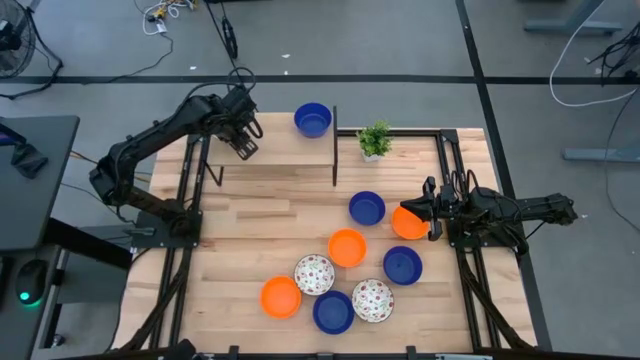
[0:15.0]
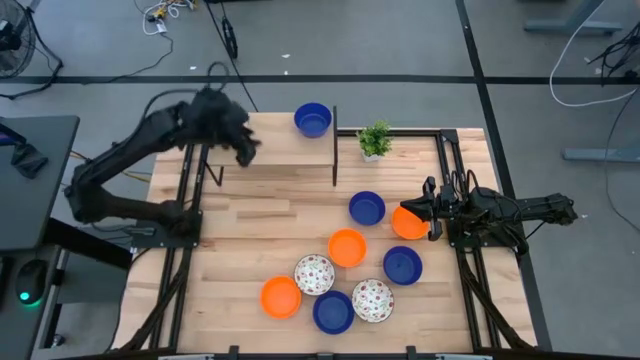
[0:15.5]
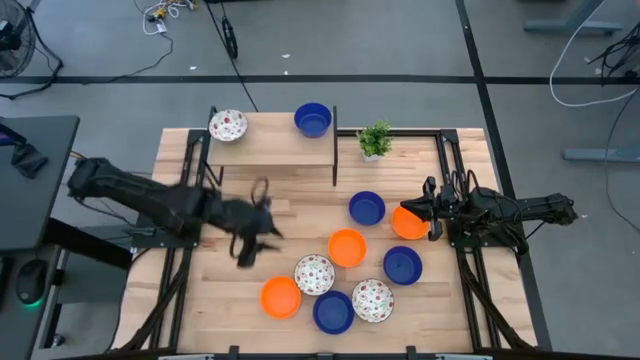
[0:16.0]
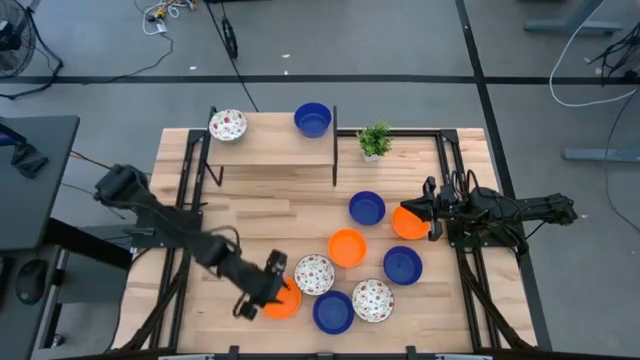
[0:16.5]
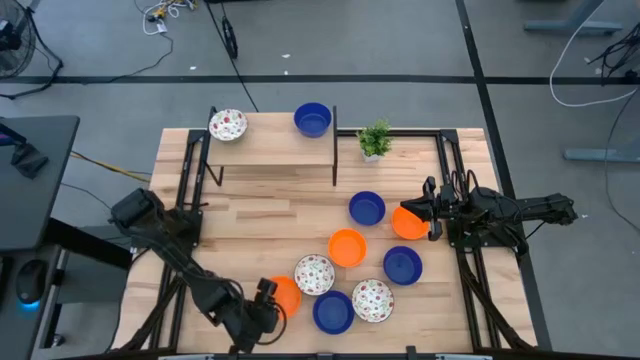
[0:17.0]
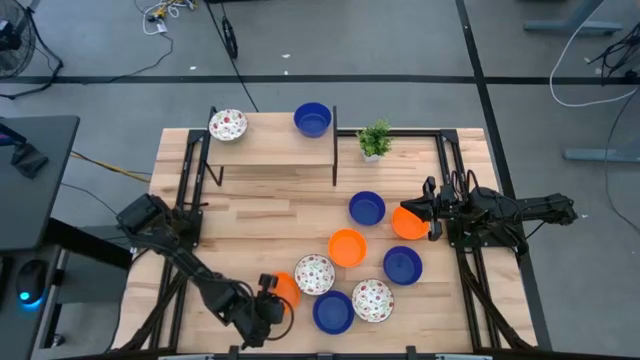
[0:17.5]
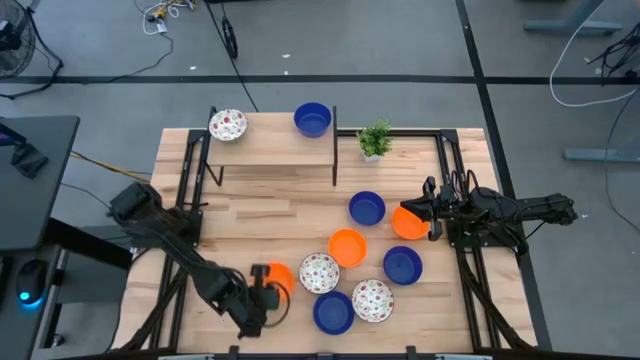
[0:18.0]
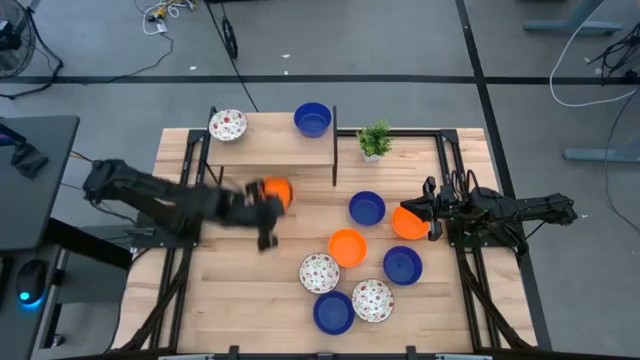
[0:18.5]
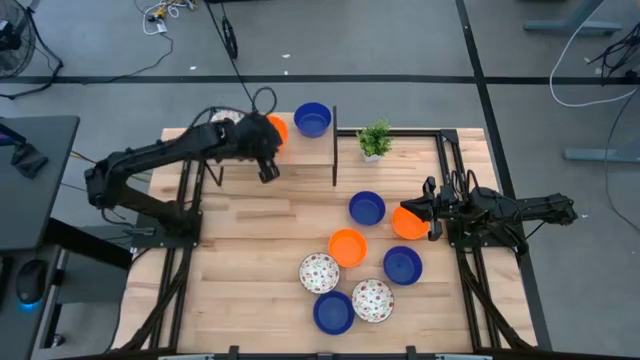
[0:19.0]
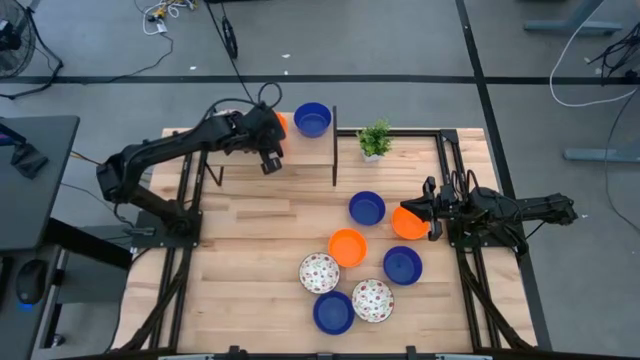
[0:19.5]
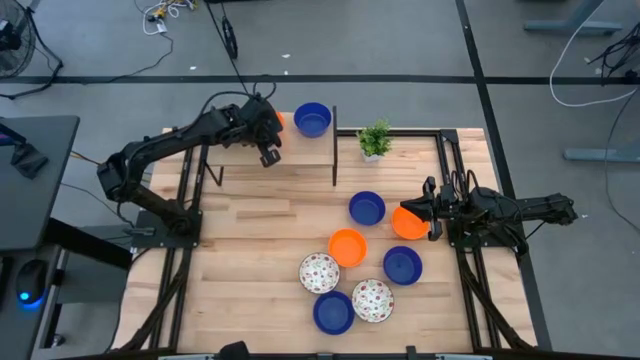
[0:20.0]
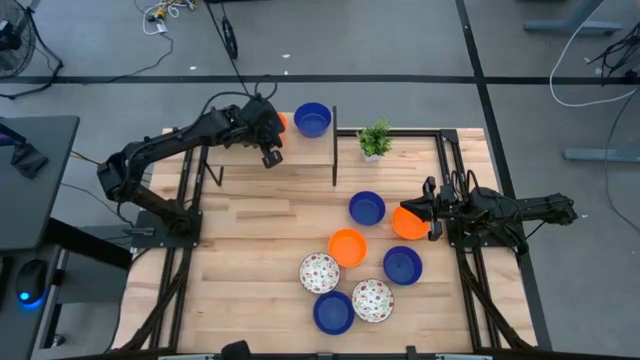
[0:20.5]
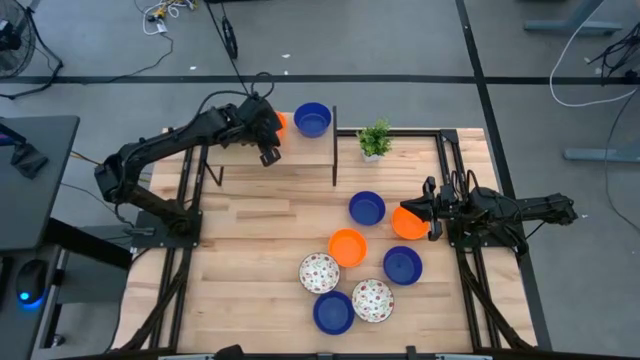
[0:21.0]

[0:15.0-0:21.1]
Task: Pick & Place Mini bowls
Put the orange bowl on the shelf

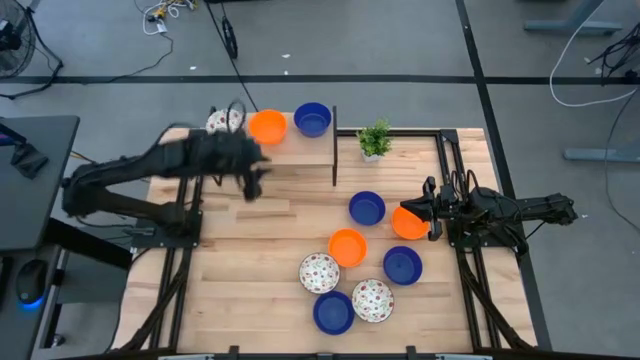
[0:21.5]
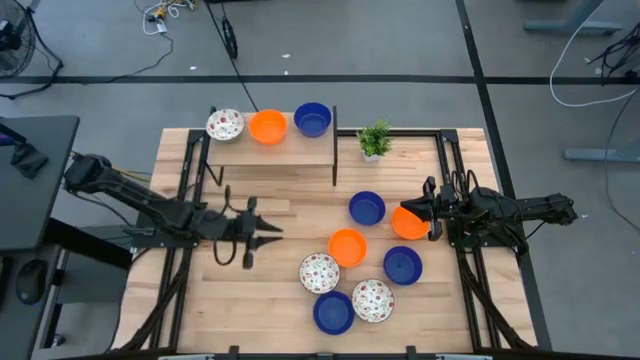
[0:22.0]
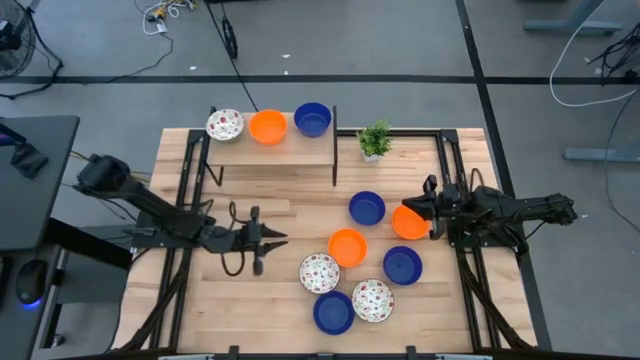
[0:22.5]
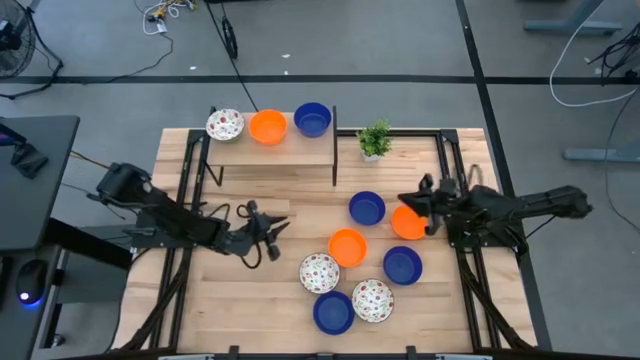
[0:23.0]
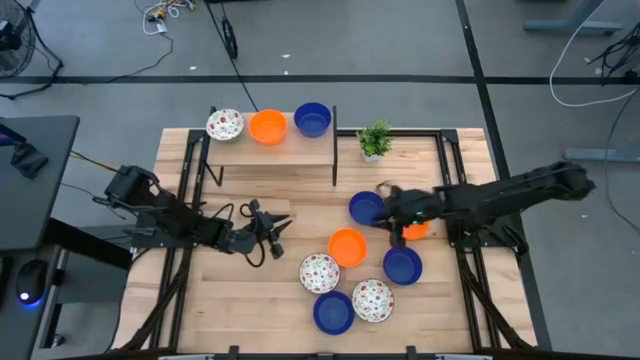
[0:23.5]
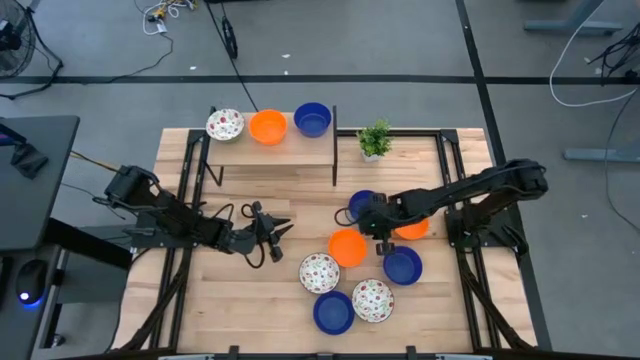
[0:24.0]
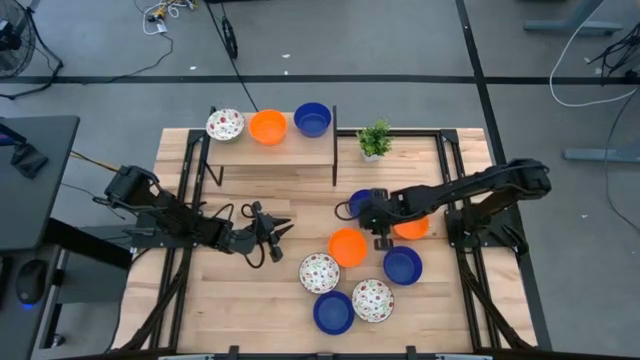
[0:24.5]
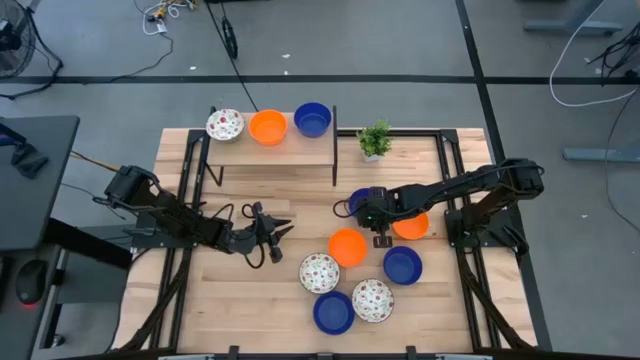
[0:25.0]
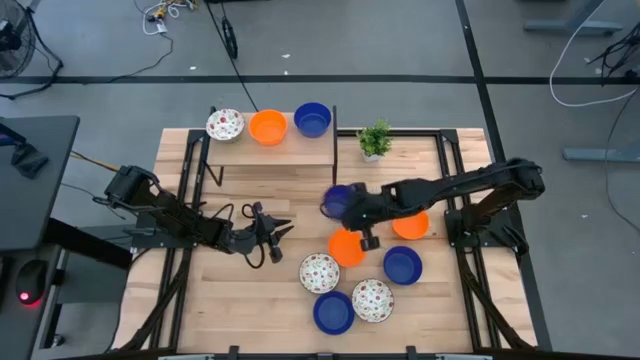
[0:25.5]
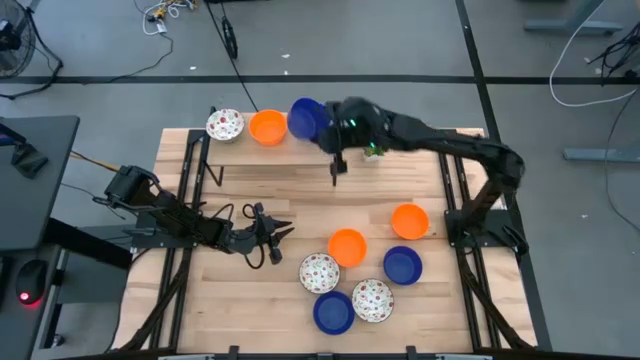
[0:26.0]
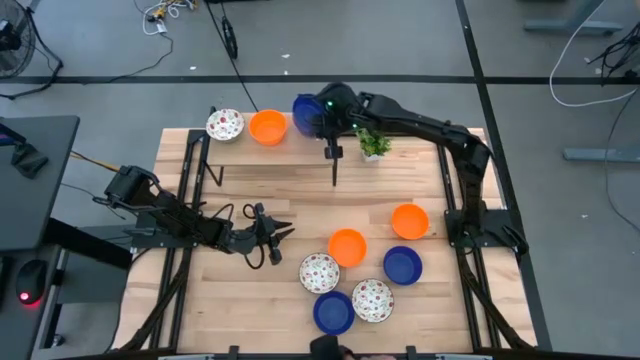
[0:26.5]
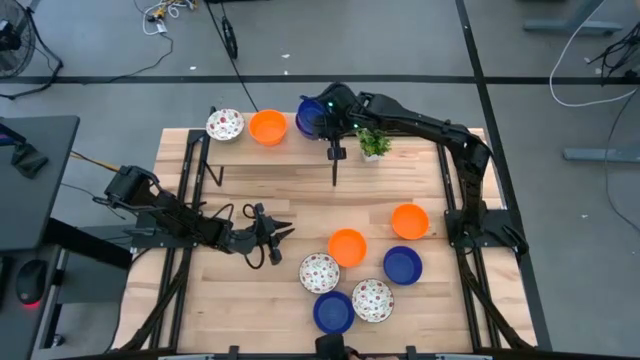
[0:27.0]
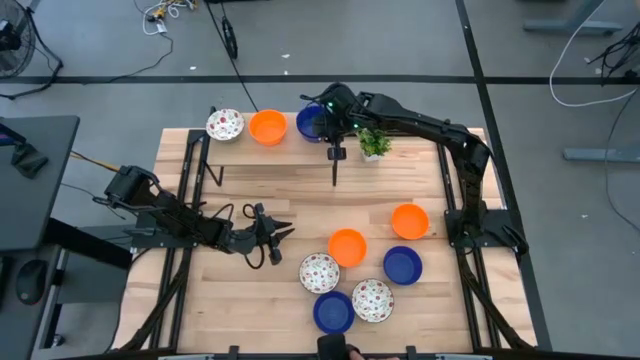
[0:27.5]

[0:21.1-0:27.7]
Stack the blue bowl on top of the blue bowl on the shelf

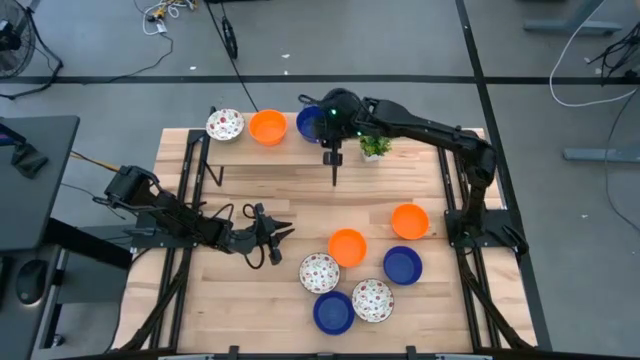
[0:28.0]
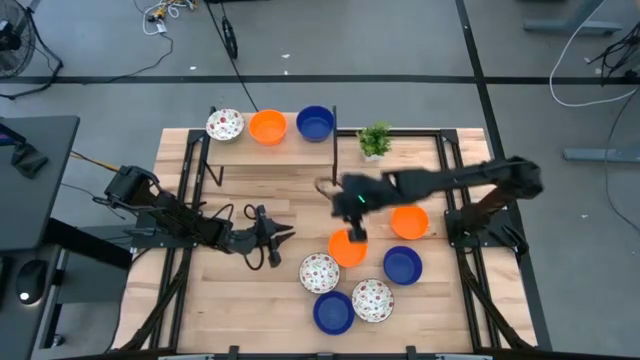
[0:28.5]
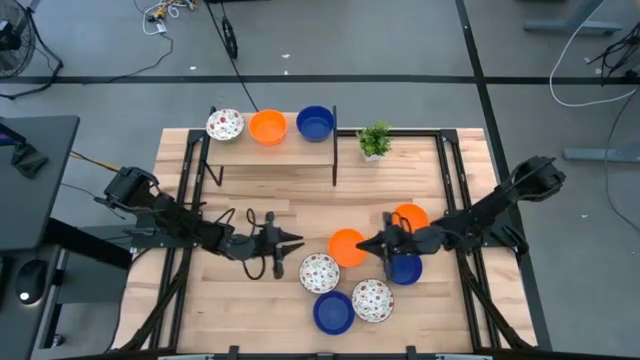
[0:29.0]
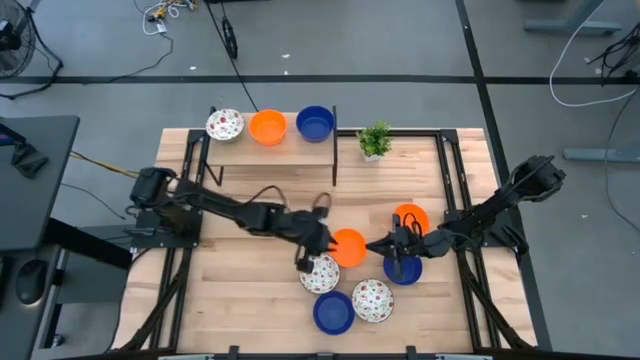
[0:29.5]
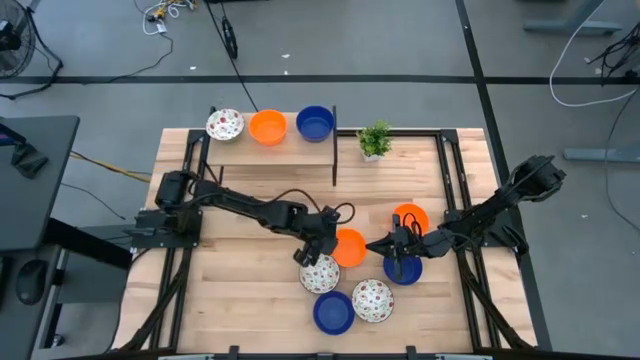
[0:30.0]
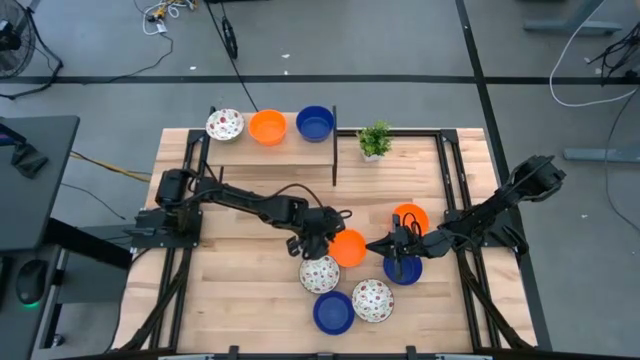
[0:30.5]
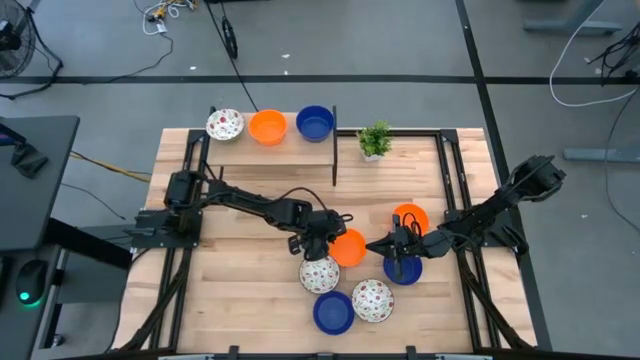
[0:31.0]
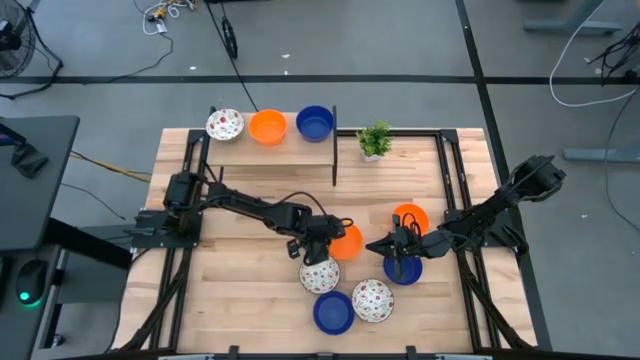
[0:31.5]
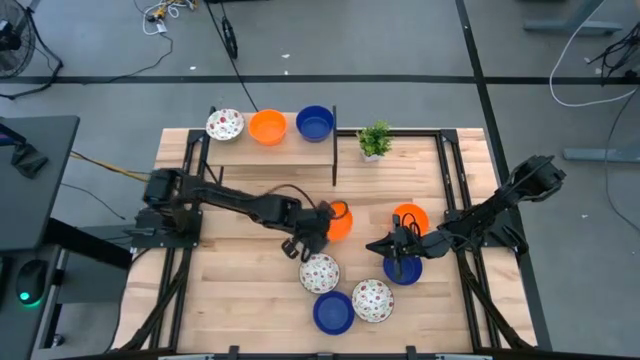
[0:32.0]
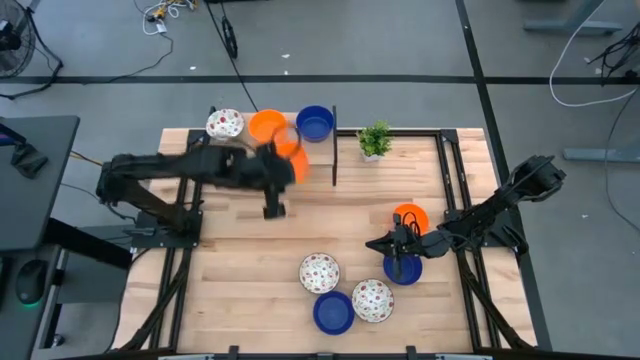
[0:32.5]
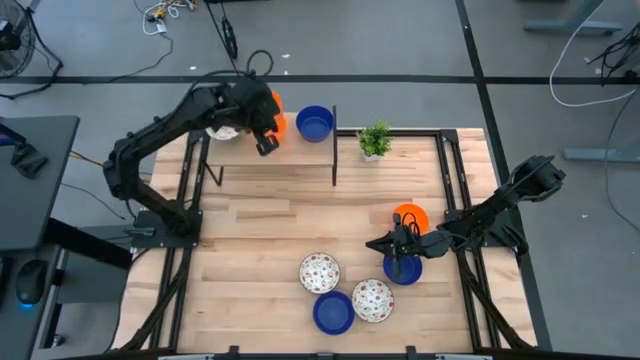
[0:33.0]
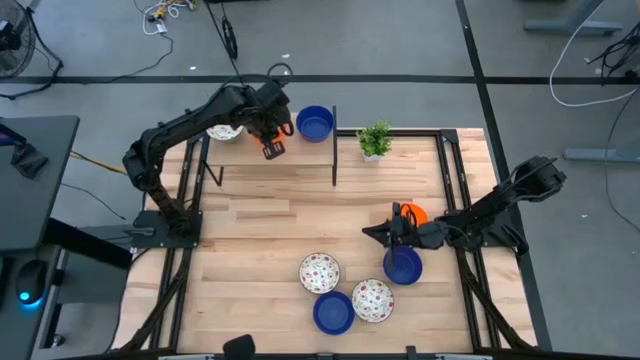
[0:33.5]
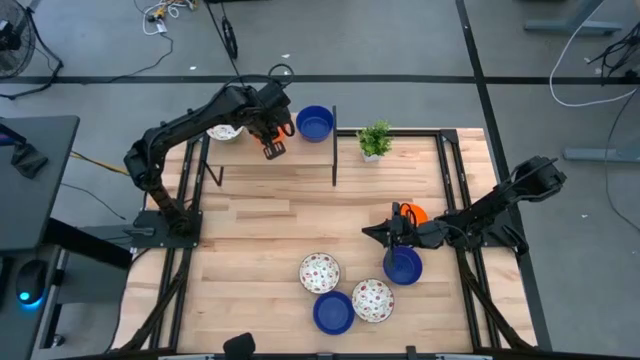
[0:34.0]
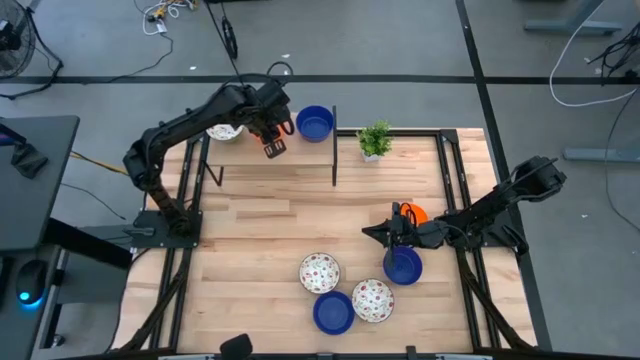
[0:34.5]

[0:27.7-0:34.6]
Stack the orange bowl on top of the orange bowl on the shelf

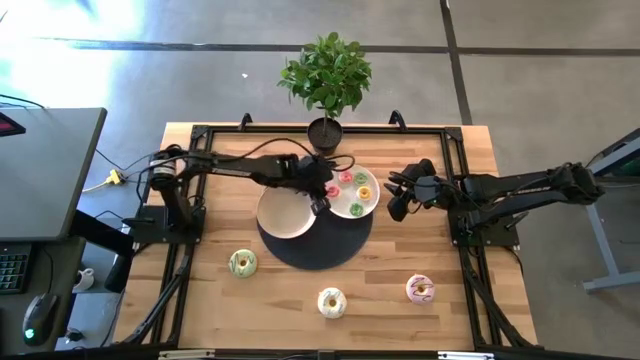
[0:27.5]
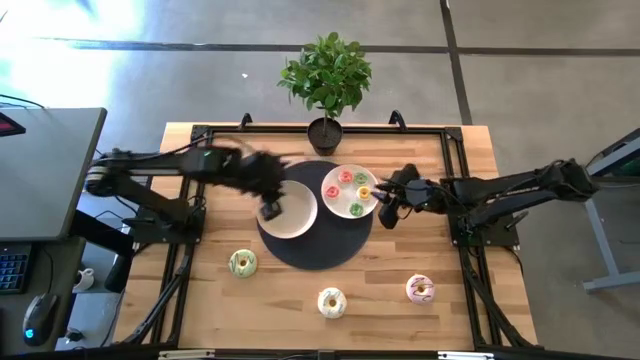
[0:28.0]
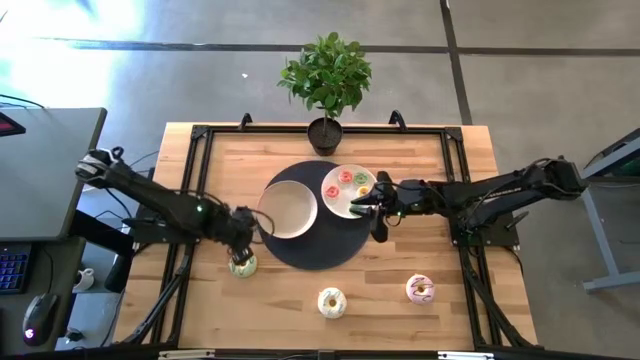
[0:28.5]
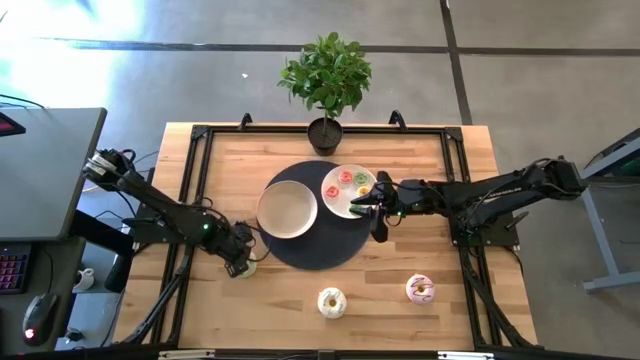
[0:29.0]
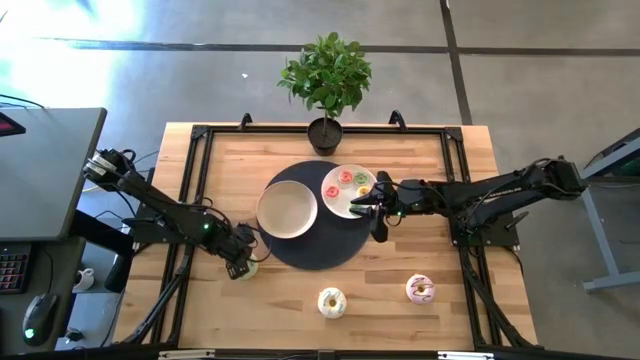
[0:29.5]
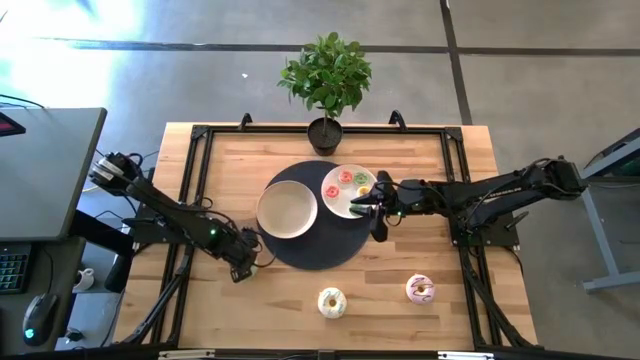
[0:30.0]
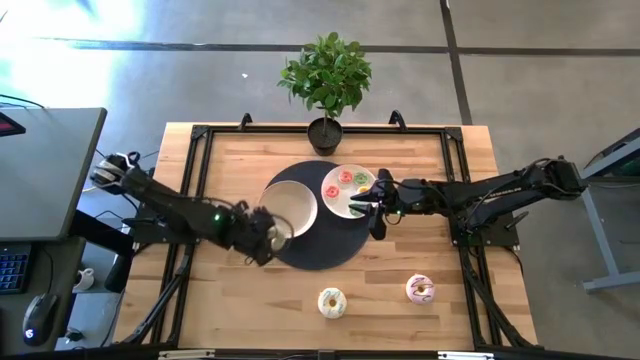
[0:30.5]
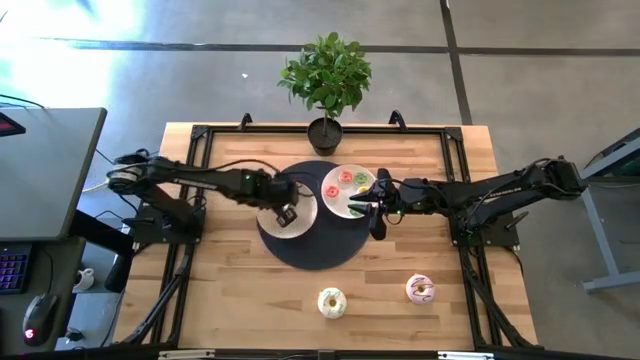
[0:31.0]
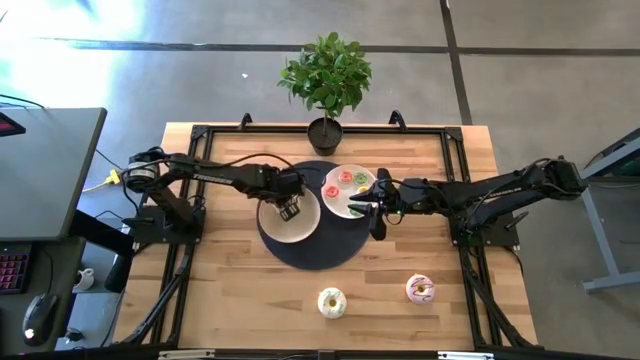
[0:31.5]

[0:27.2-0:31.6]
Task: Pick & Place donuts
Put the big green donut on the left white plate
